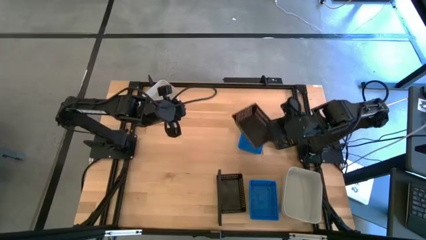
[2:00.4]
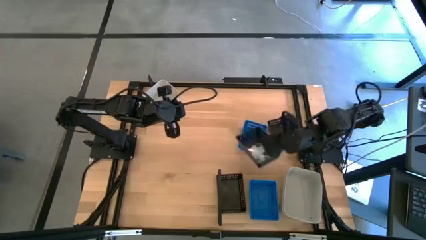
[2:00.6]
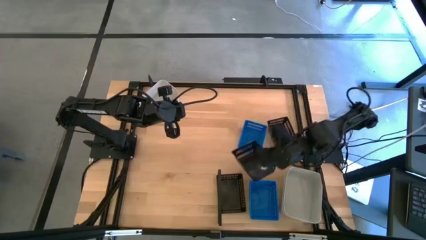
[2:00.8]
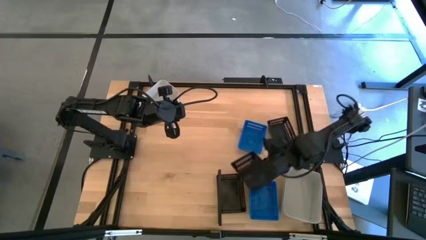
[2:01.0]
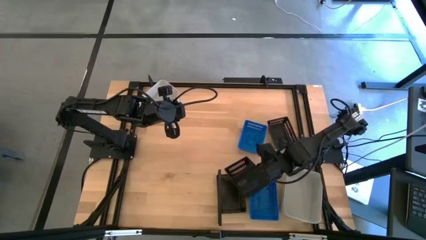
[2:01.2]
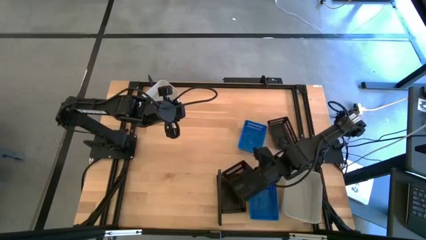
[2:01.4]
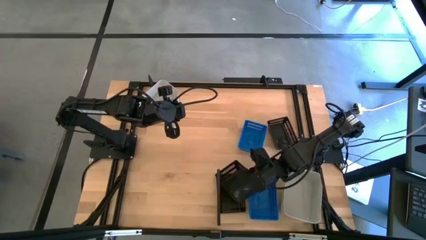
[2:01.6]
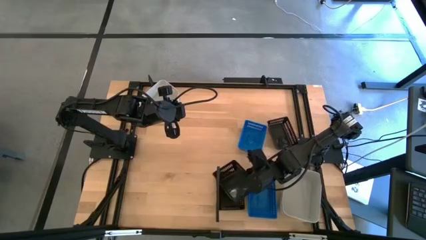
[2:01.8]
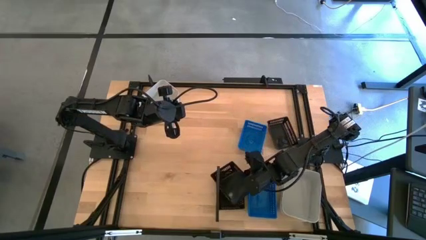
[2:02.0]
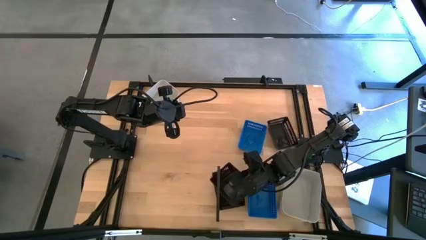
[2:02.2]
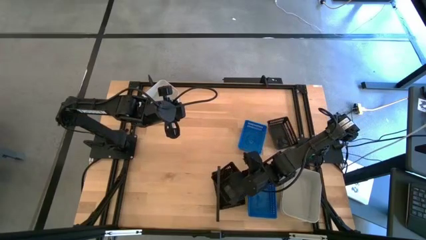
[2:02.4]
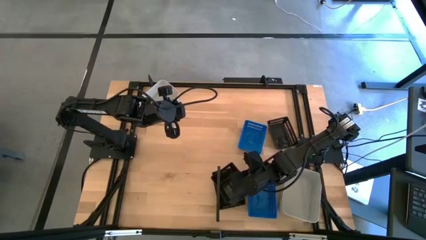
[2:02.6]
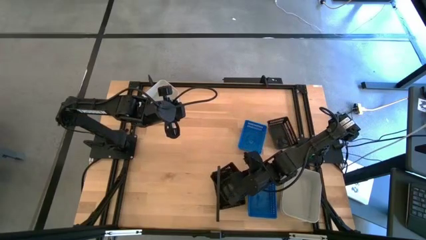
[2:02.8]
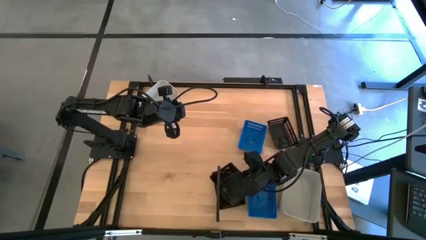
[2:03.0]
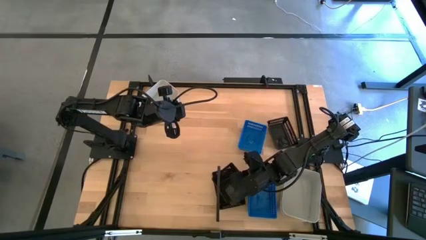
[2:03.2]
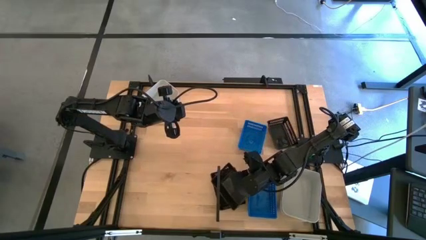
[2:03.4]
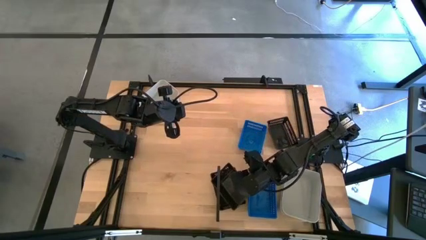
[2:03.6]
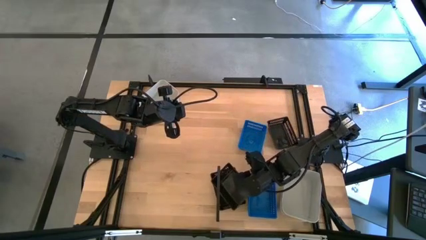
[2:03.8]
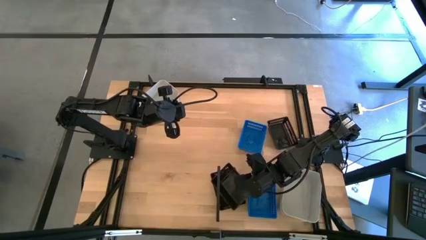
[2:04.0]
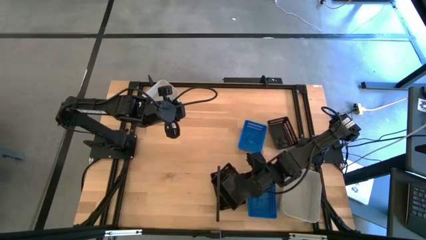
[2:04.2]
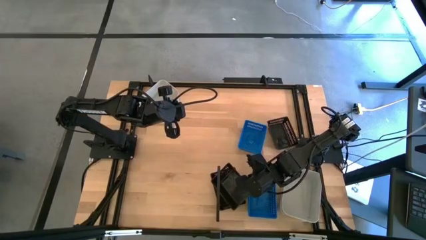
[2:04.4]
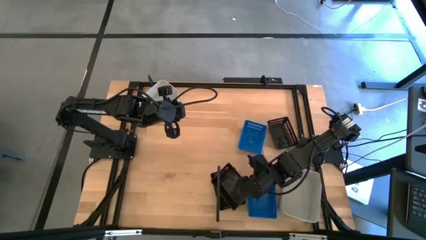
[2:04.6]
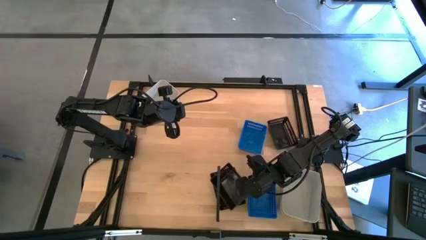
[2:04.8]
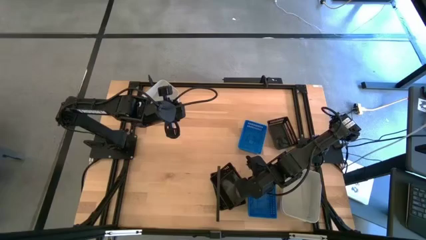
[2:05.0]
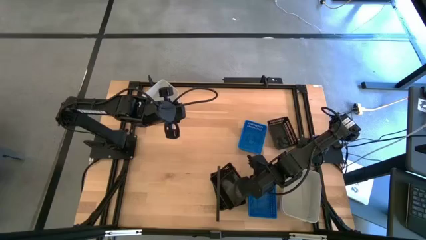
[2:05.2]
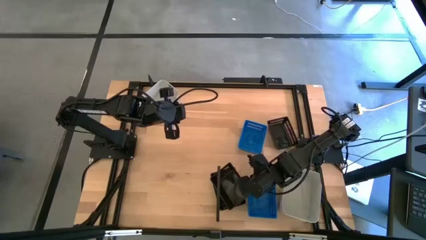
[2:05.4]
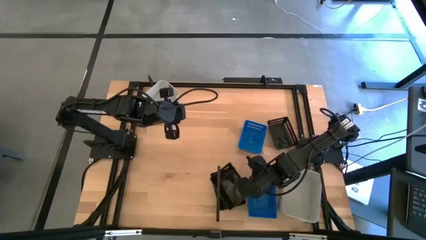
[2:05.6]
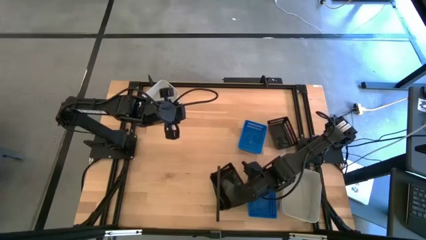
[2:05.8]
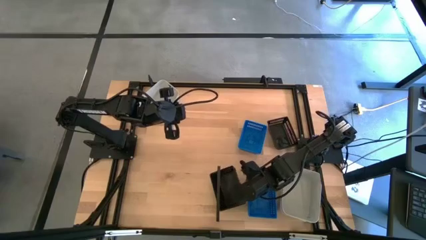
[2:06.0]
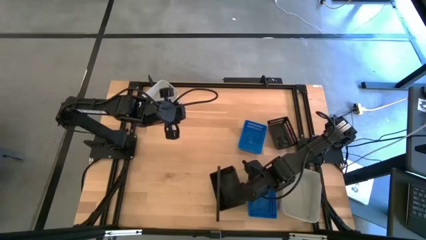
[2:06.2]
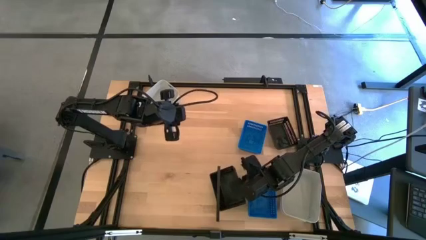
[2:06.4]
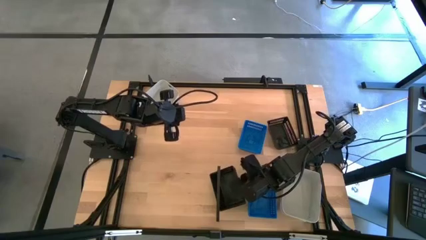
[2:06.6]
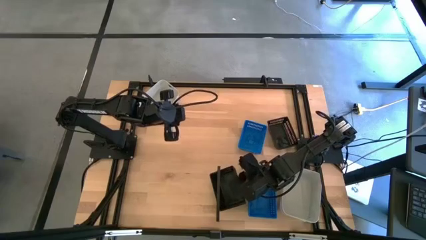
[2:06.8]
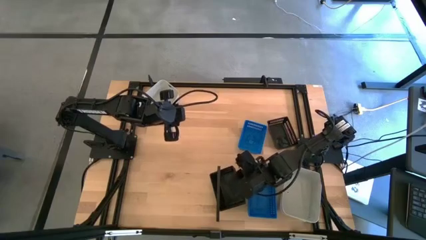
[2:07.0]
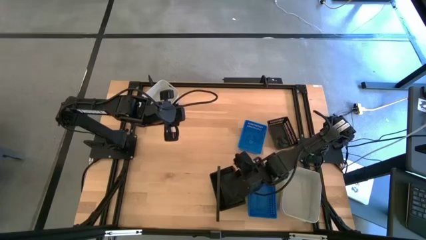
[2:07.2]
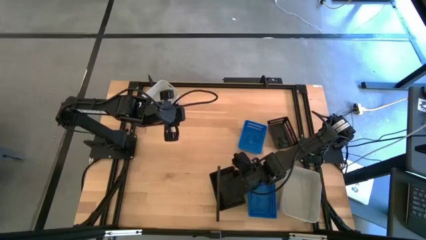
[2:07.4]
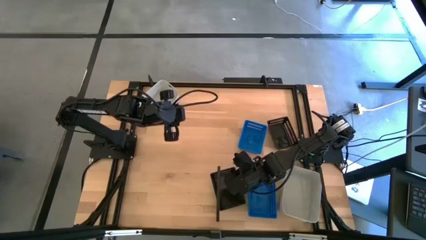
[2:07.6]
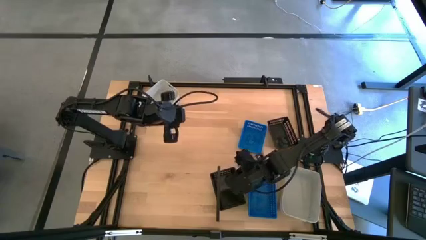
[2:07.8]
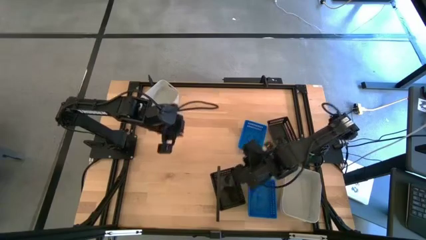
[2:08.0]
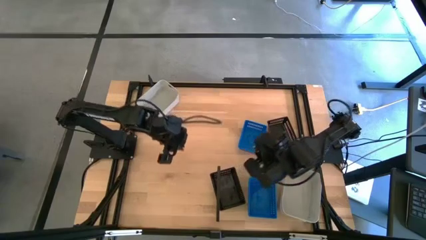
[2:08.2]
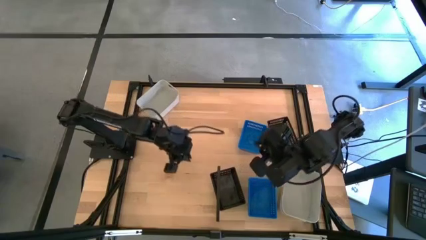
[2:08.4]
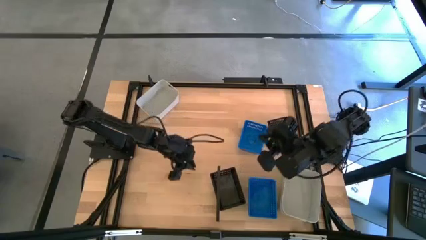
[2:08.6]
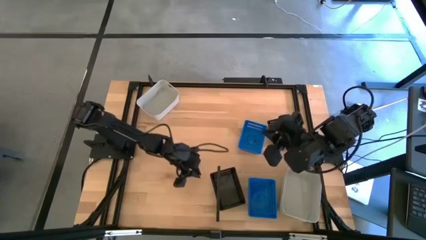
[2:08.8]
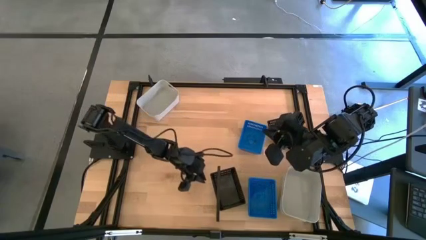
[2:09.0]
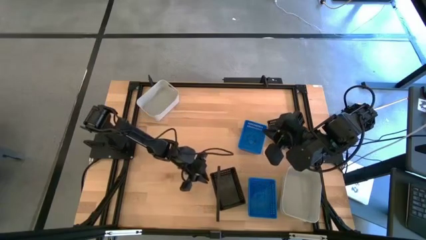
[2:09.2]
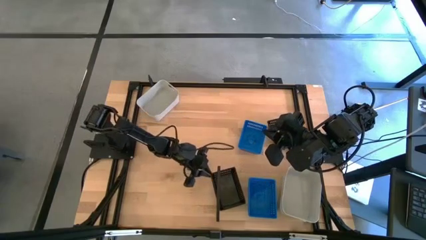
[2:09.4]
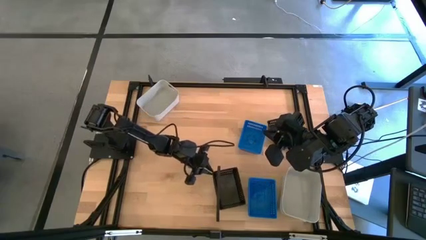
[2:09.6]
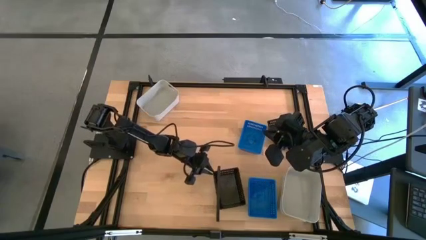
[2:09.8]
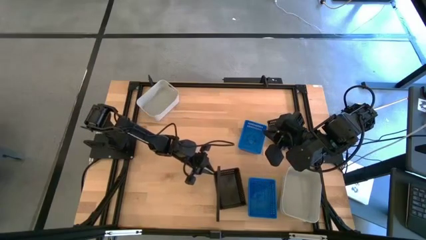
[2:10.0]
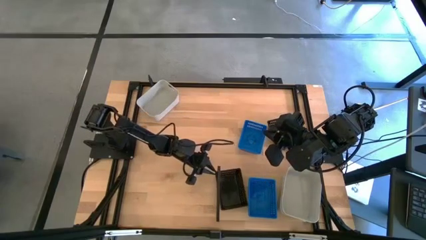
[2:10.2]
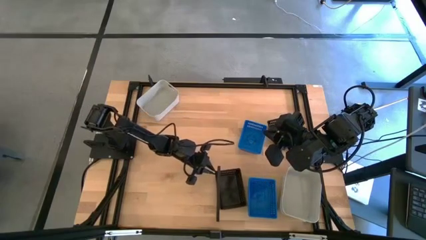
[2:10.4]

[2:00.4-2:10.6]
Task: Stack baskets on shelf by color
Stack the top black bin on top of the black bin on the shelf

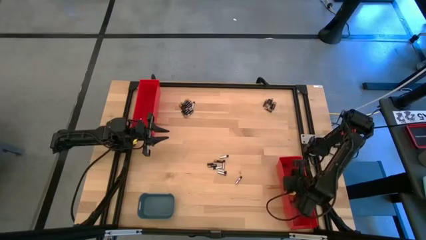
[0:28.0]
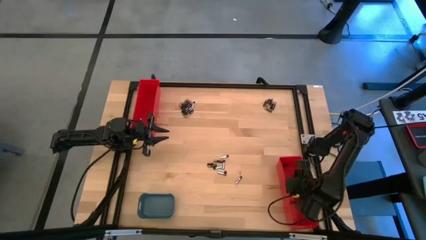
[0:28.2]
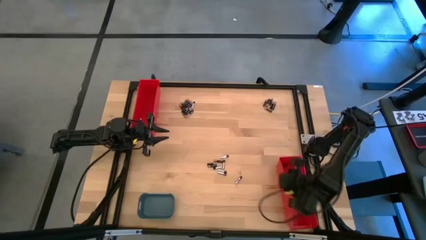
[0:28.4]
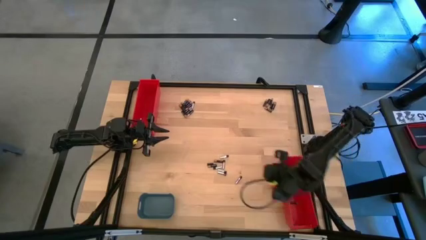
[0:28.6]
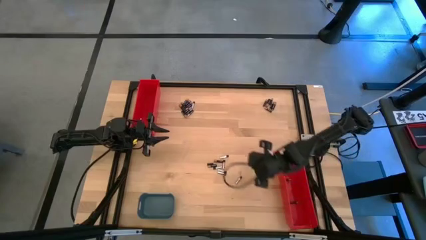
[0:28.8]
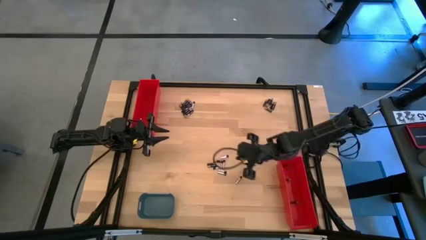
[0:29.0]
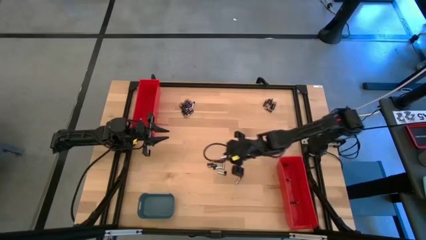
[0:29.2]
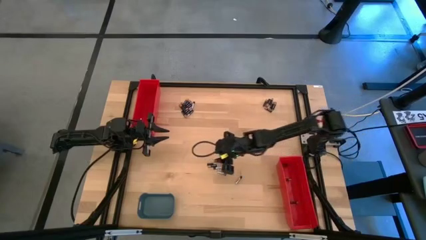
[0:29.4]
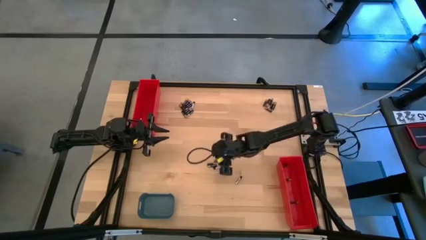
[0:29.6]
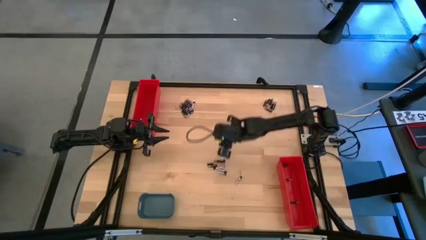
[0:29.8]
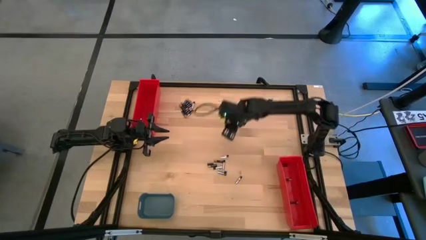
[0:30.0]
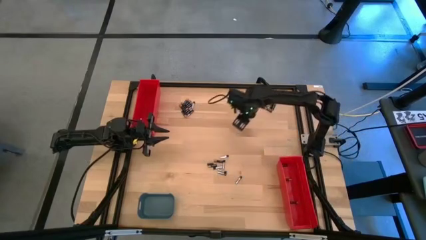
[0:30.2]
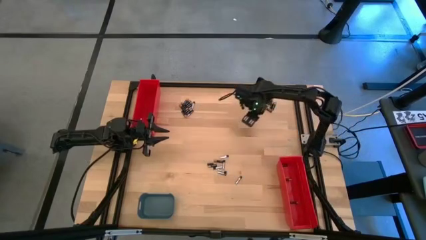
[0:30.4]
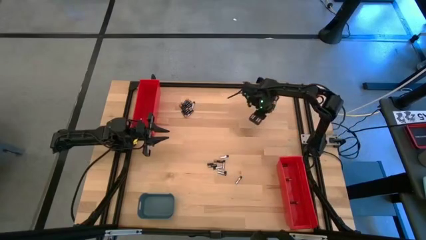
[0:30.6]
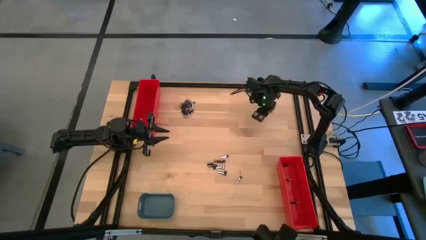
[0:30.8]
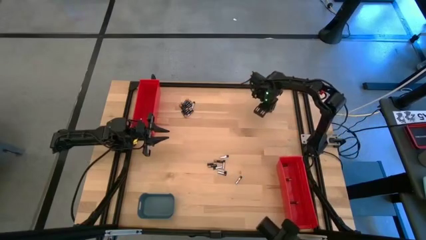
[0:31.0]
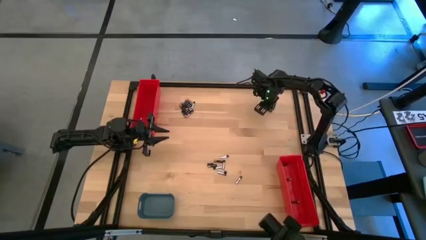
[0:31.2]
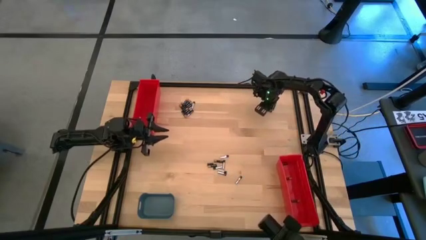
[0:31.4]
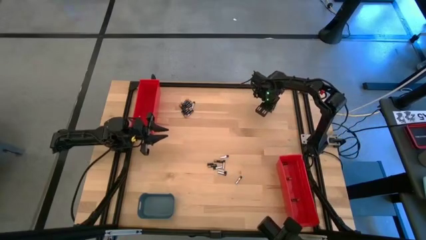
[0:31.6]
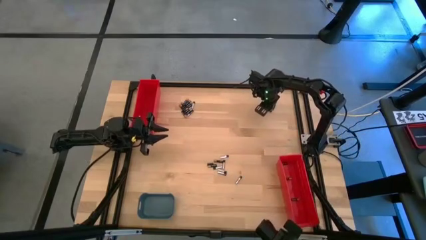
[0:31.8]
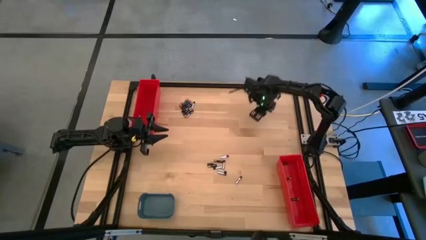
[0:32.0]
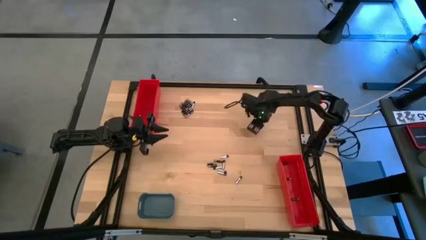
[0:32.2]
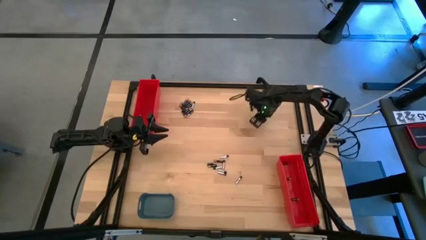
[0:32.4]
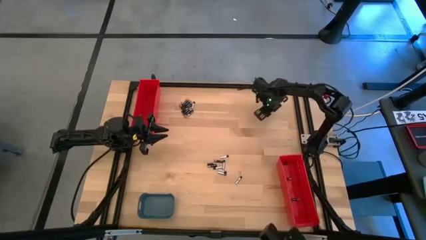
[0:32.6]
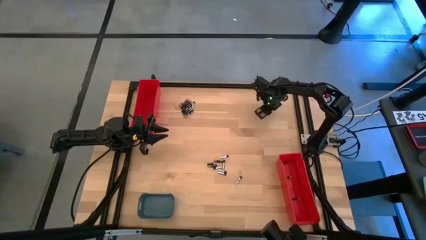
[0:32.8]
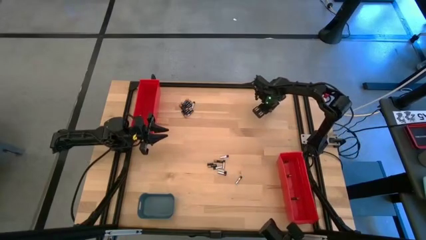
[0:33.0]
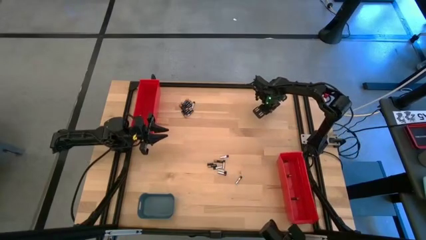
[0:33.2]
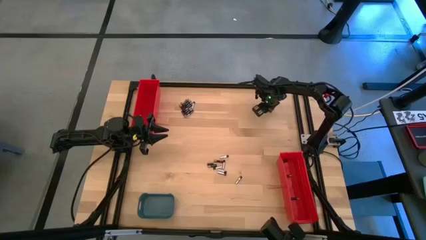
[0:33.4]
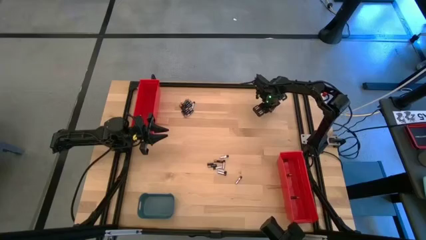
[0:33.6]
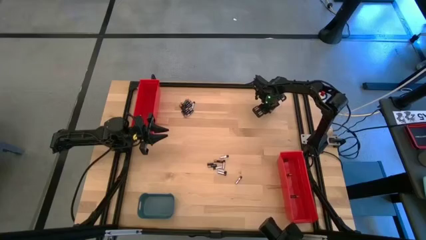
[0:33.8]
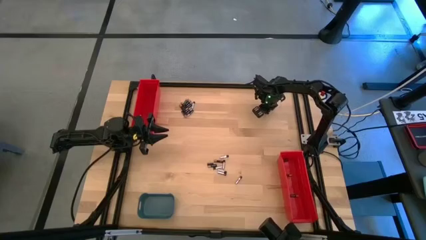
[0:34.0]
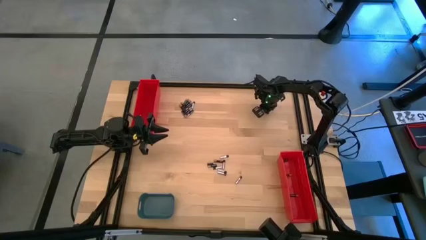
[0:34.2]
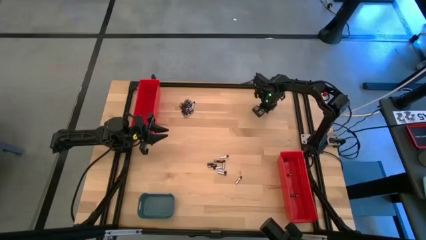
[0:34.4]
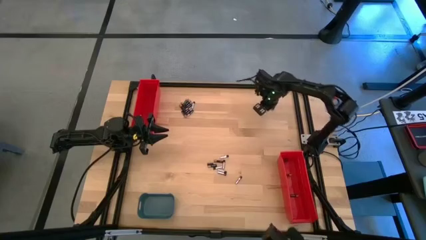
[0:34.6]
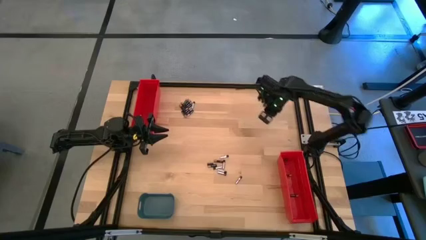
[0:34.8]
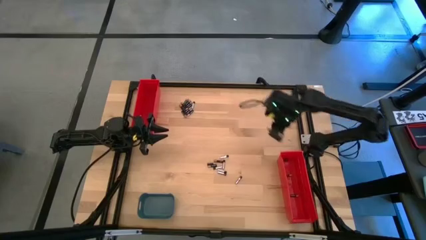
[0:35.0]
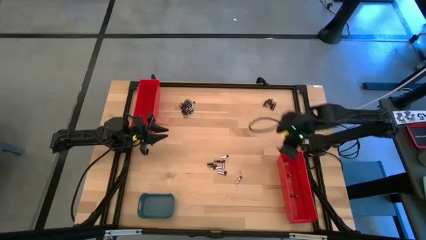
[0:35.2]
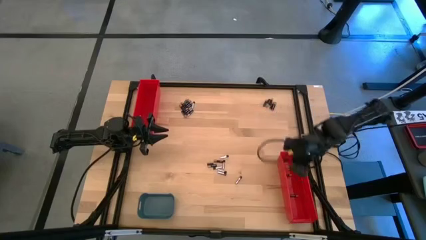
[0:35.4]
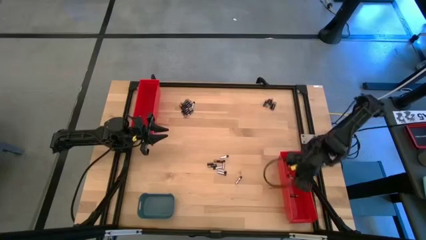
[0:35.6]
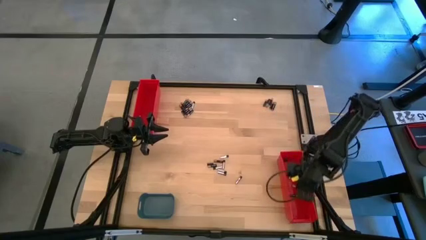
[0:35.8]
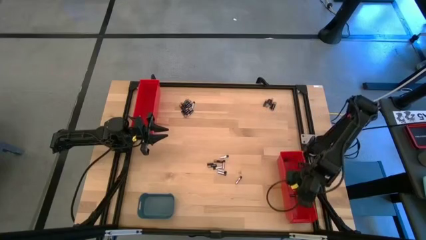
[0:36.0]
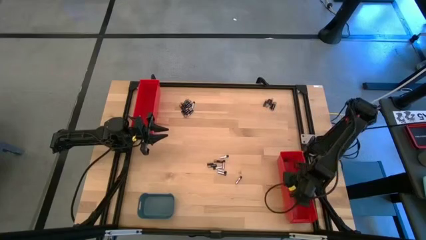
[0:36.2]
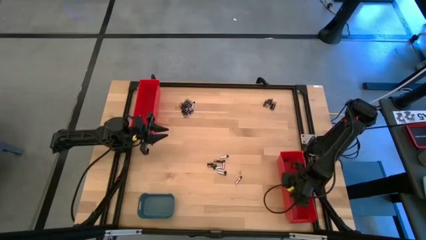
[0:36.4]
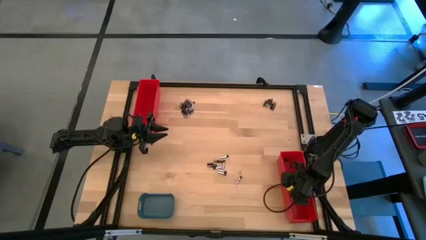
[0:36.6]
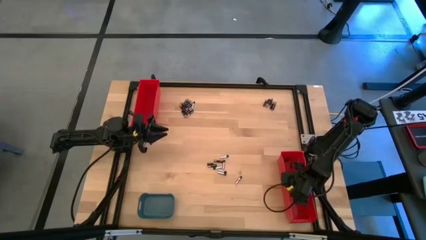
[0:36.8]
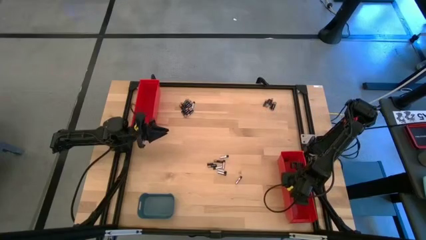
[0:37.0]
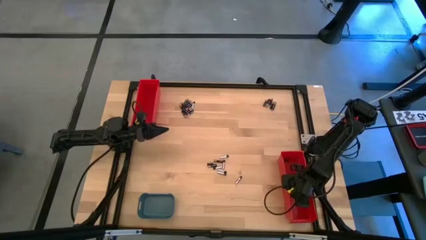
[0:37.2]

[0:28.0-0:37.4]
Task: Sort batteries
Put the small black battery into the bottom red bin
